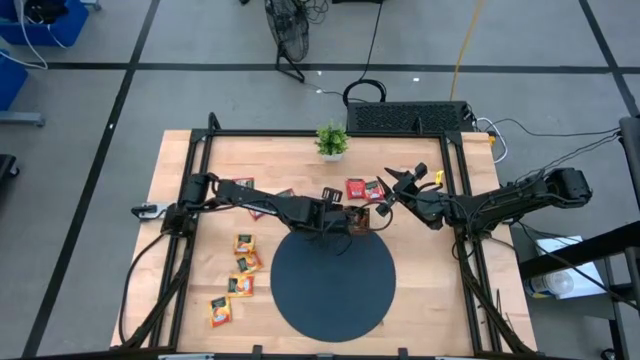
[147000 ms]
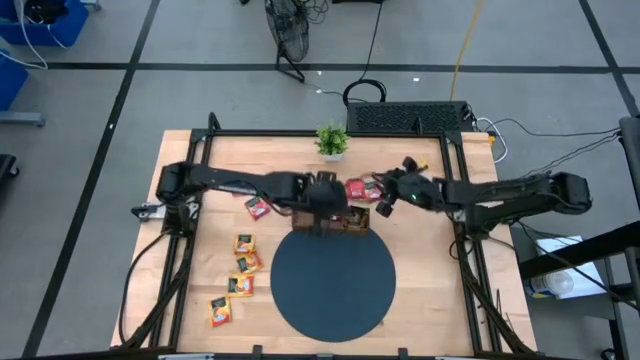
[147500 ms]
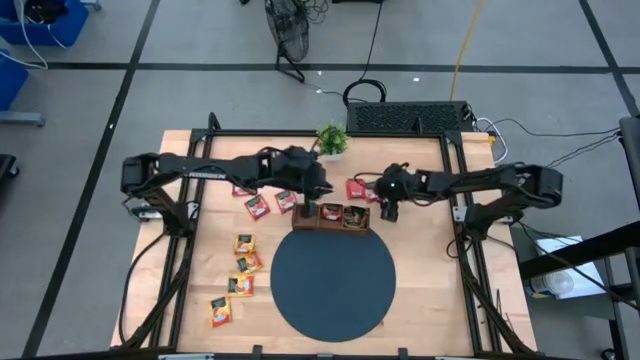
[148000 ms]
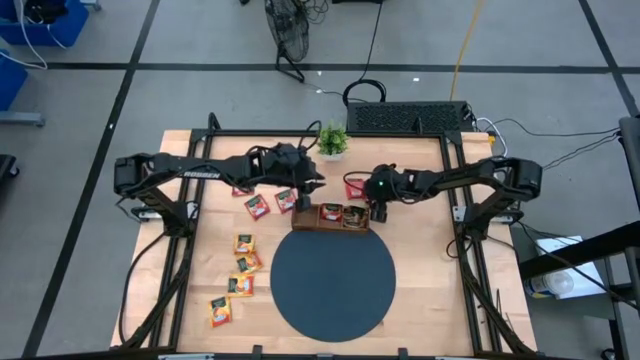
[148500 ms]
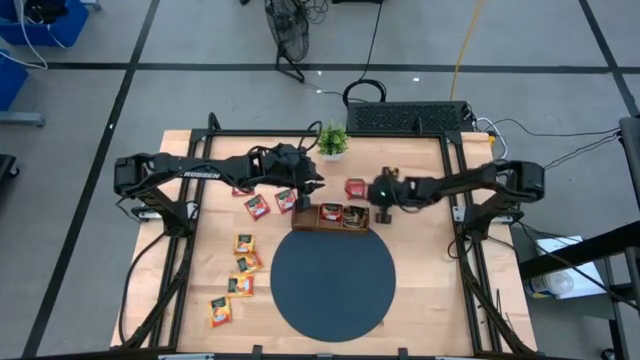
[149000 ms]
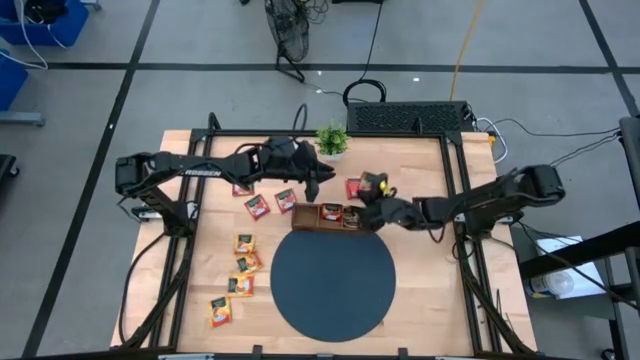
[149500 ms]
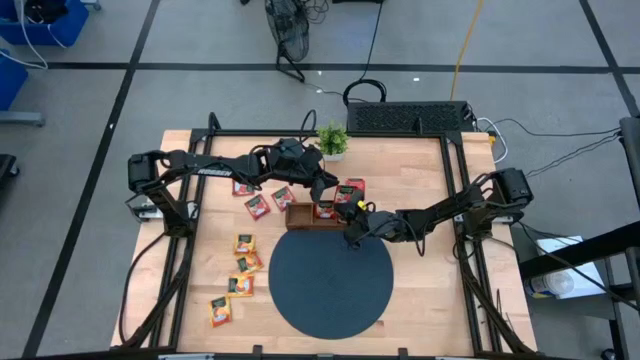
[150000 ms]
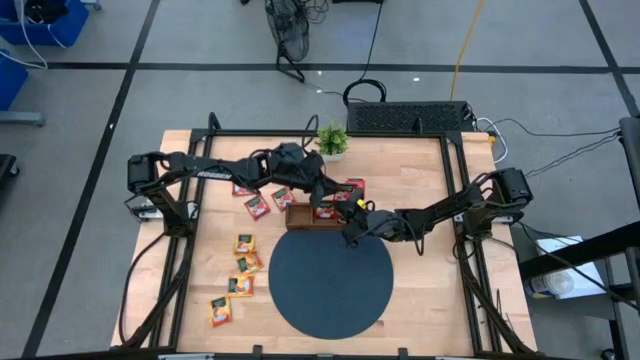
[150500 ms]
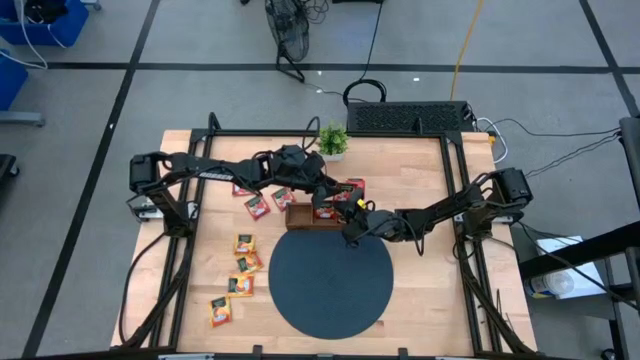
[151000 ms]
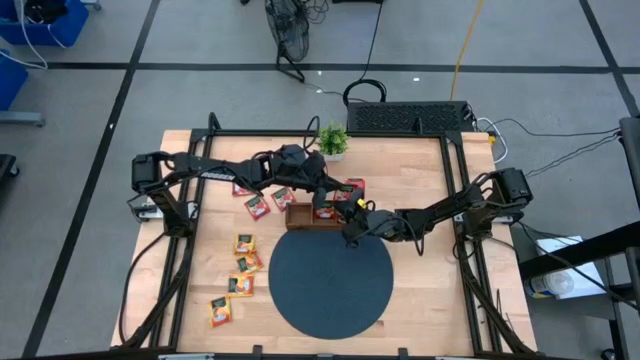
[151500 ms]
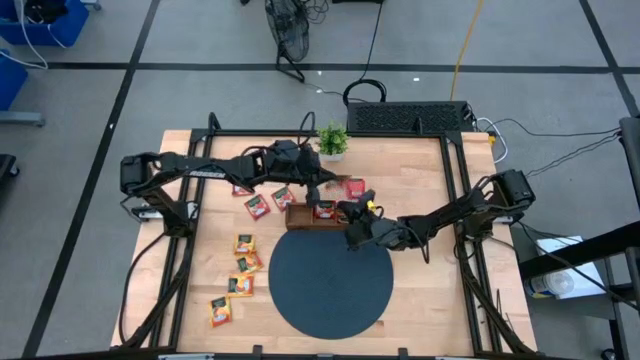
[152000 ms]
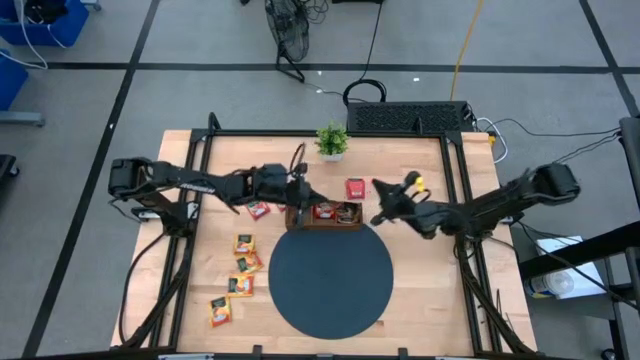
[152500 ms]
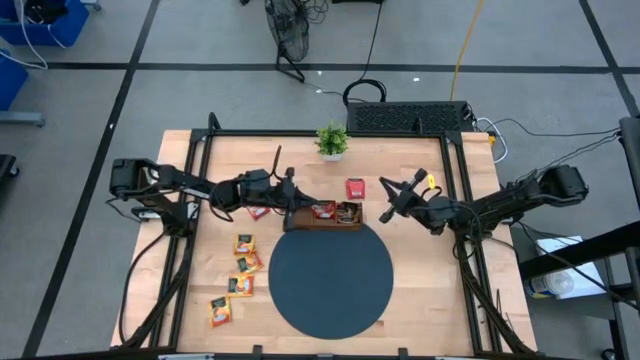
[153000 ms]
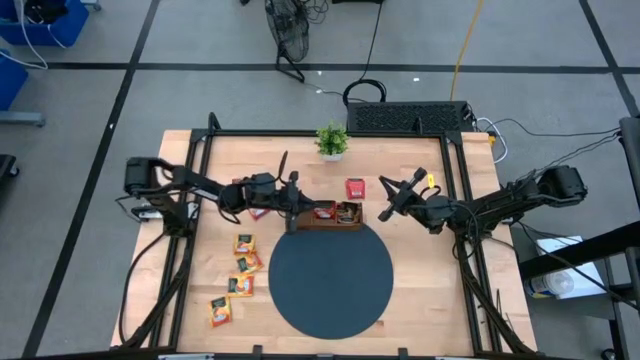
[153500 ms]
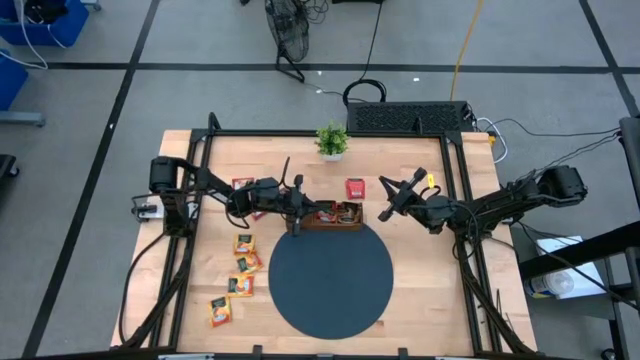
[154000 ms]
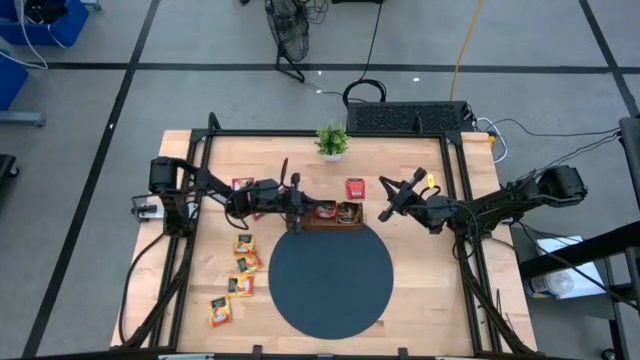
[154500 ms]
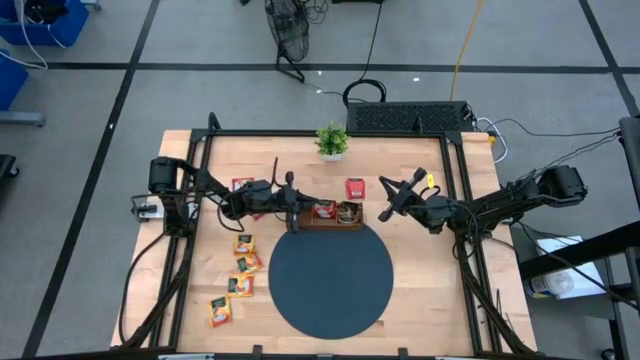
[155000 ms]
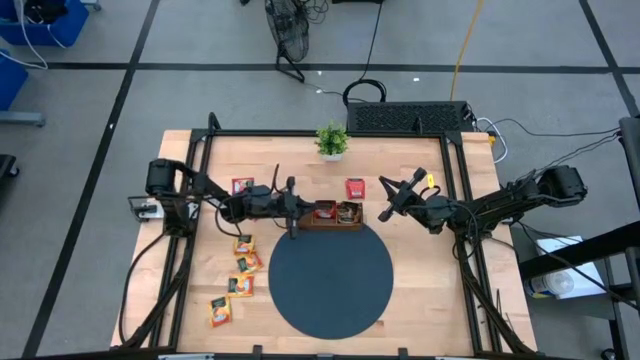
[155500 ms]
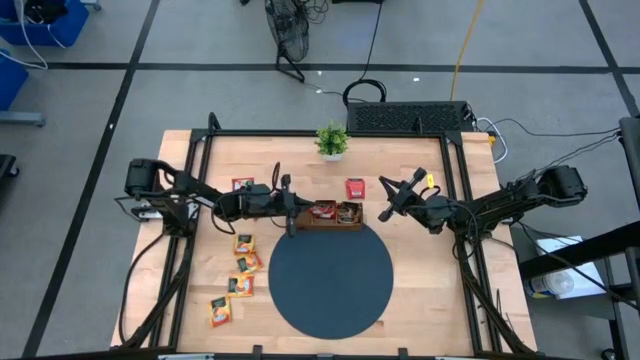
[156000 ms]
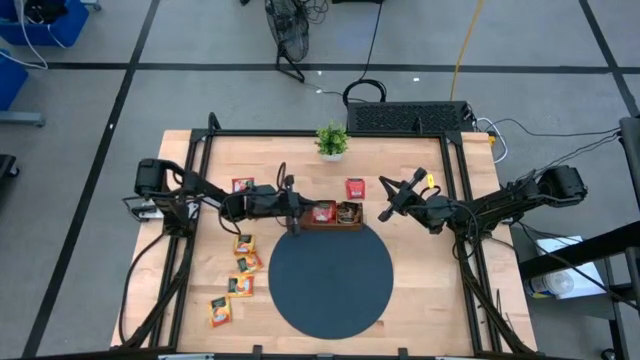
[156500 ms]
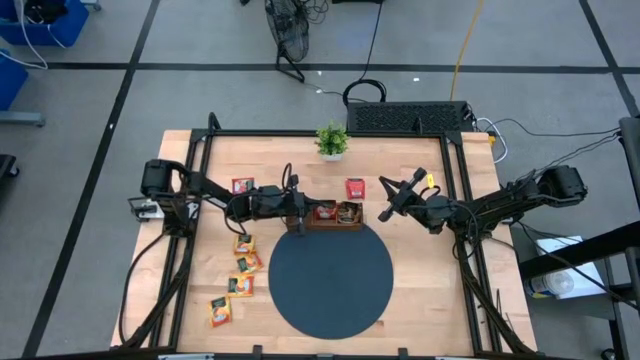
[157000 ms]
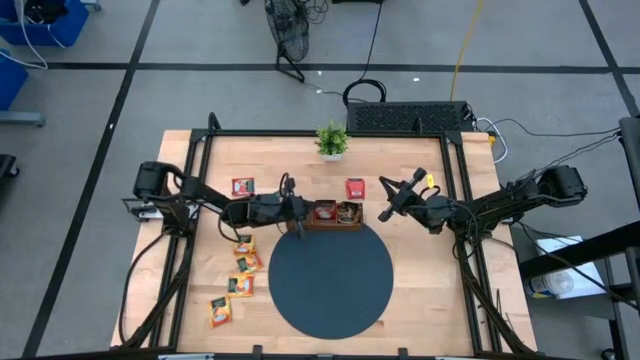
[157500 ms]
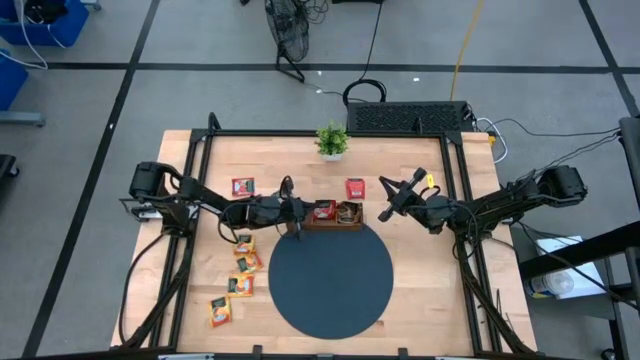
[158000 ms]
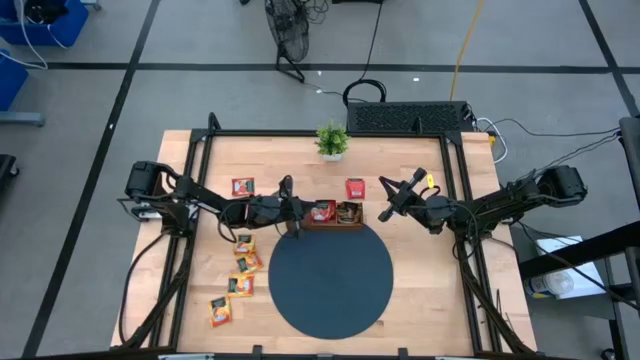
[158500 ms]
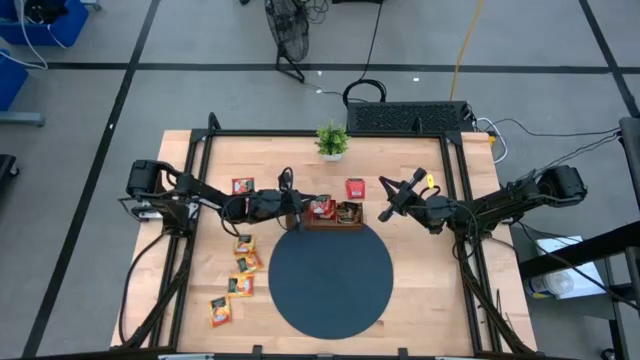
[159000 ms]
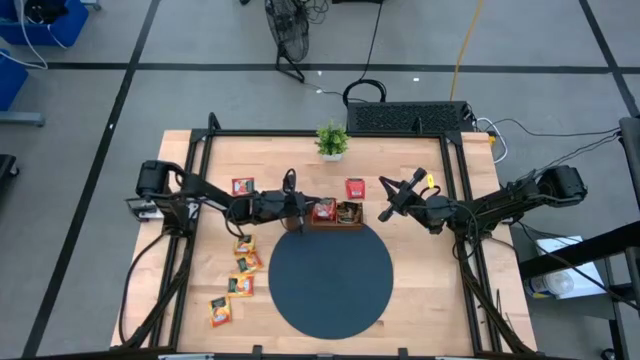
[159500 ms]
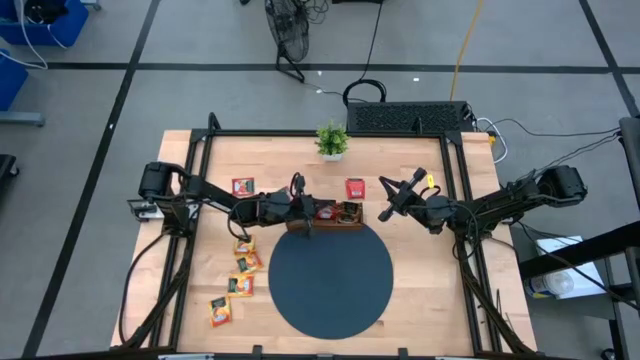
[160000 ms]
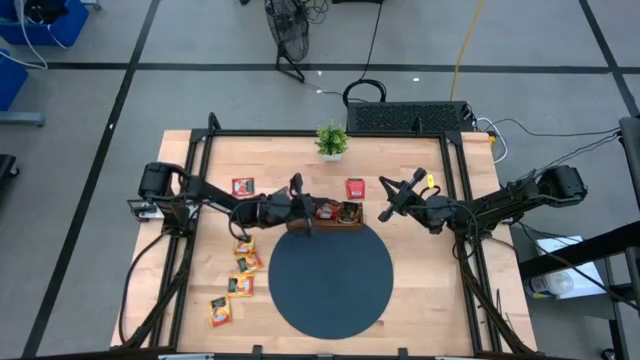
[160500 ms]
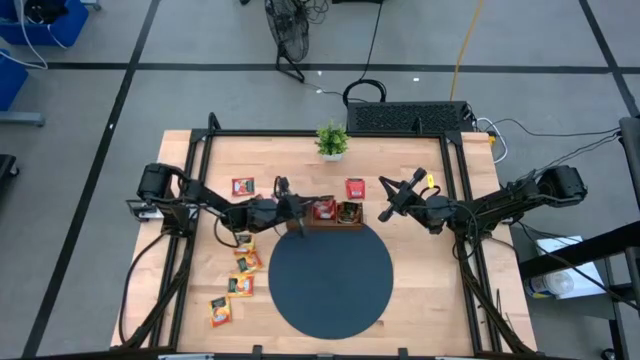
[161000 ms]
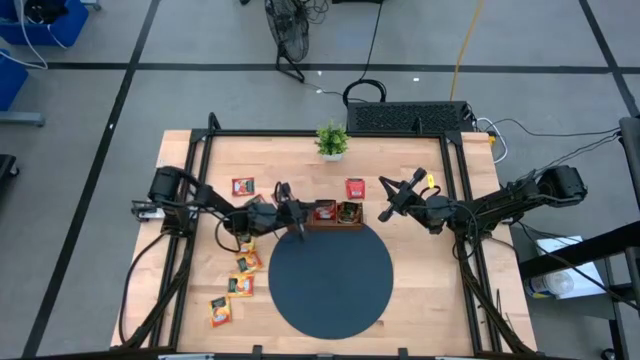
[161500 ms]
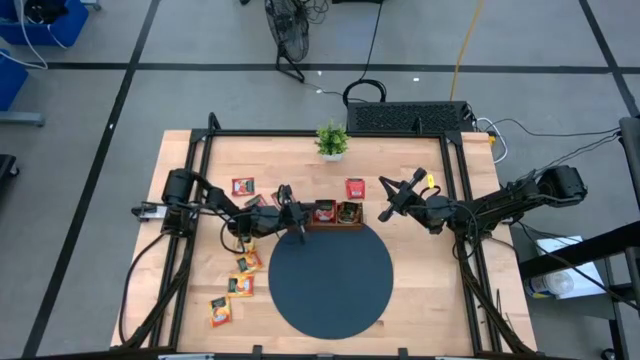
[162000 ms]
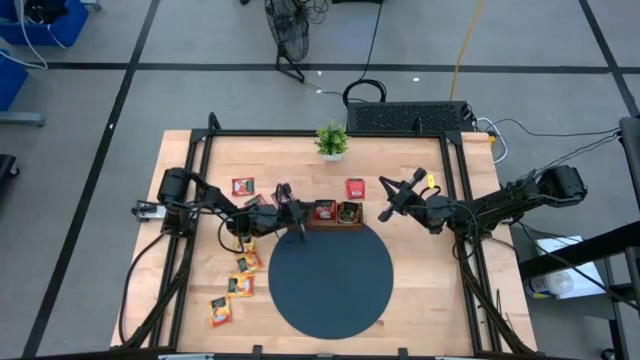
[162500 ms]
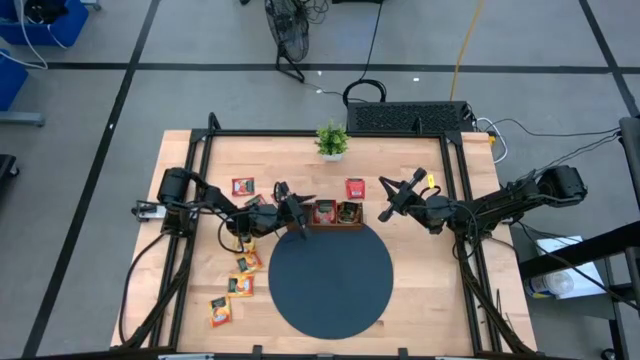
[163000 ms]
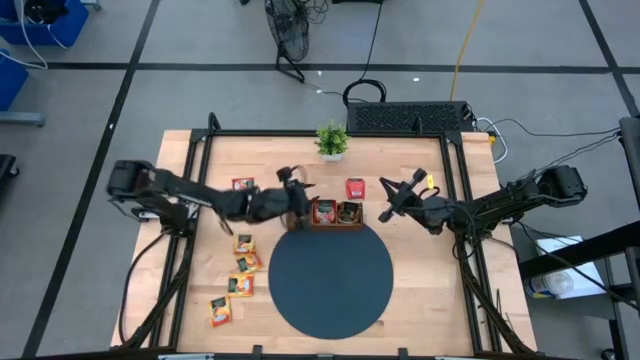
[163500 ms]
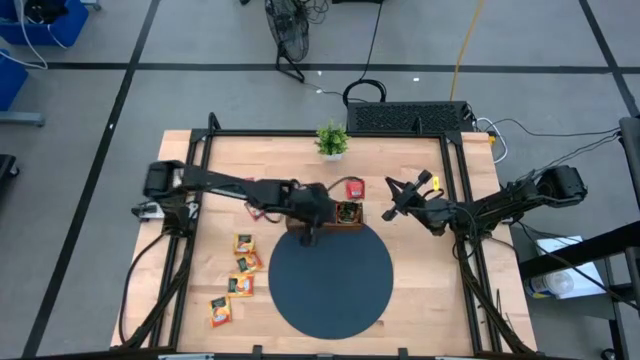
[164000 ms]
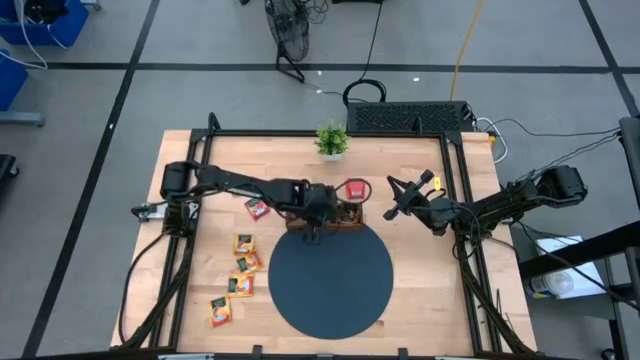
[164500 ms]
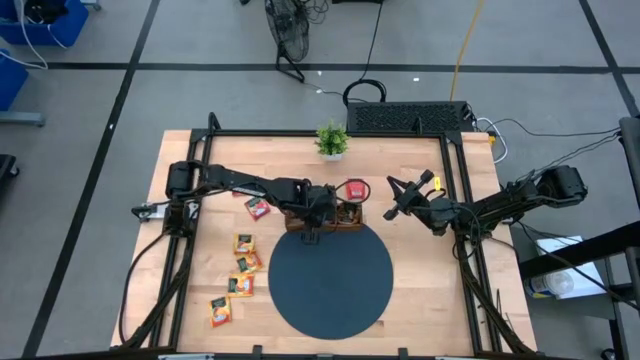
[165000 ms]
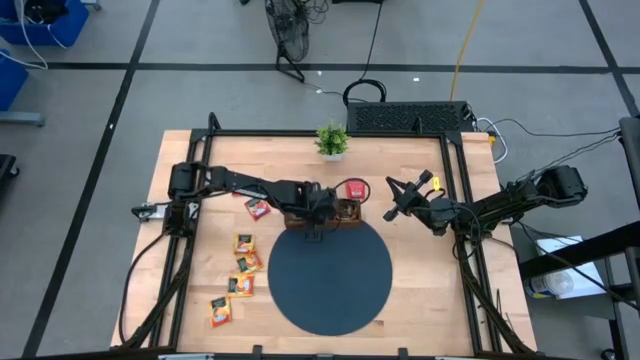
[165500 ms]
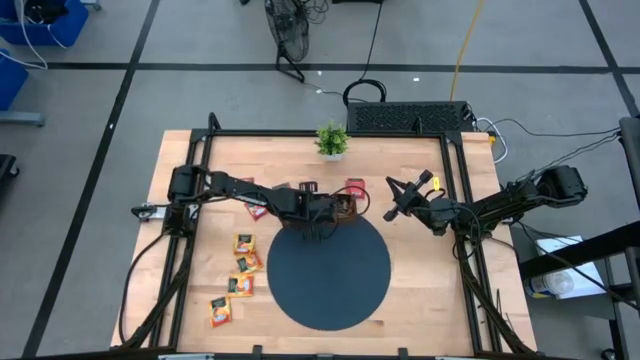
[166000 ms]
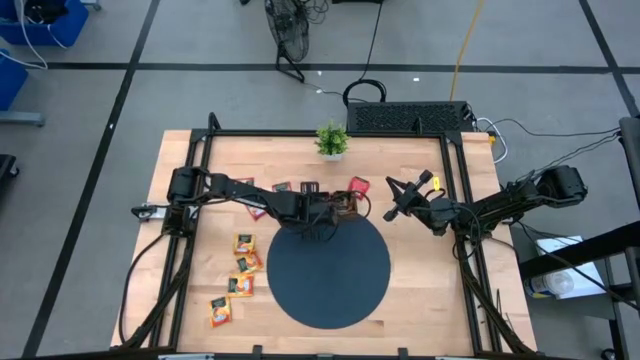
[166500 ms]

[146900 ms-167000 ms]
Task: Pick & Place Tea
Put the red tea bag into the middle slot of the wooden organizer

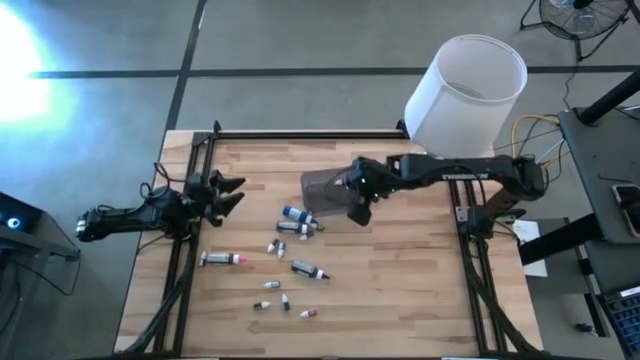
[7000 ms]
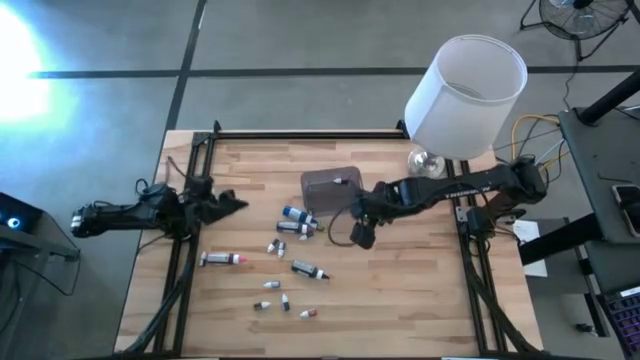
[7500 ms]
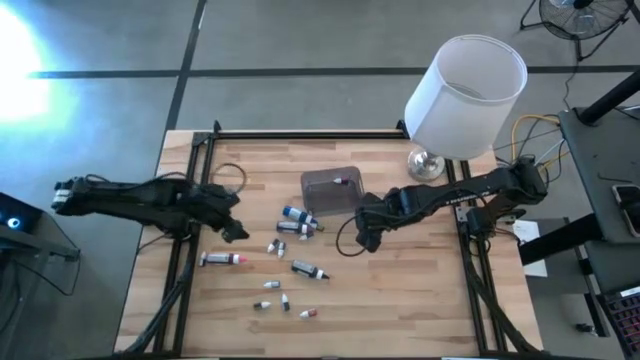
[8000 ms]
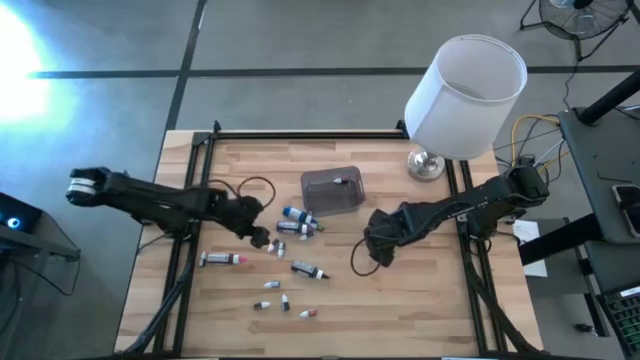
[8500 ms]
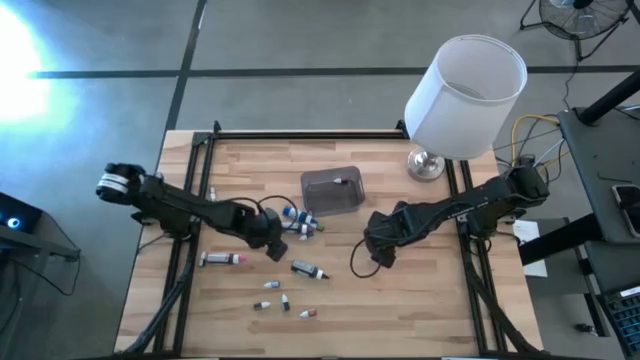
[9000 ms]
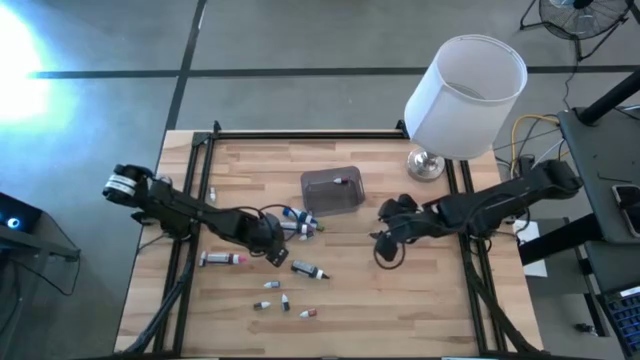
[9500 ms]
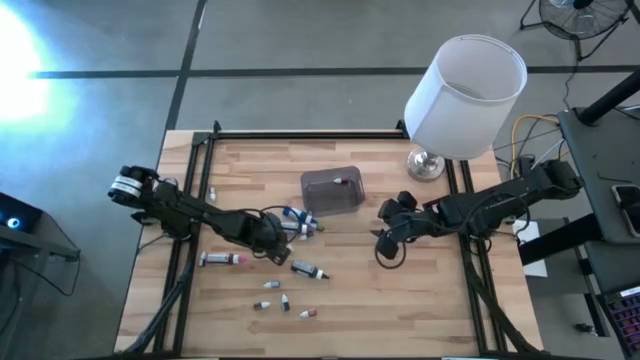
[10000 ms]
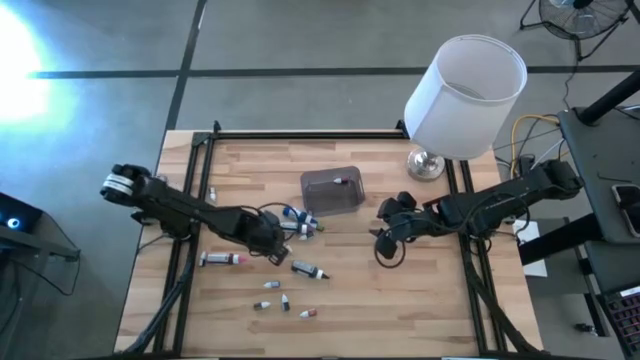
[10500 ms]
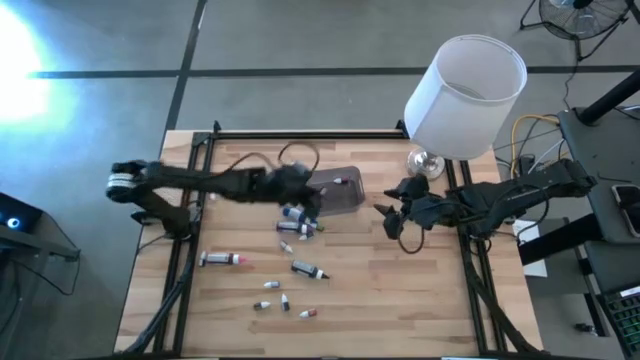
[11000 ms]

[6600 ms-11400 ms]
Task: Pick & Place food coloring
Put the small black food coloring bottle into the bin
